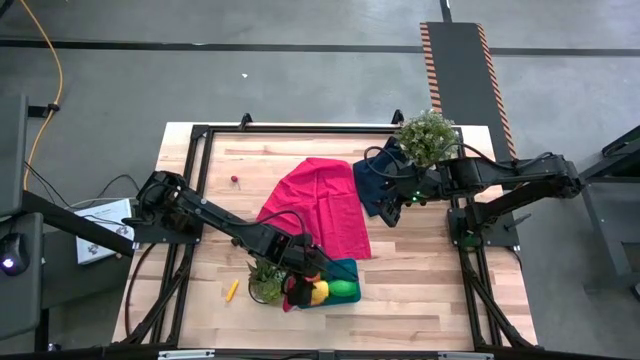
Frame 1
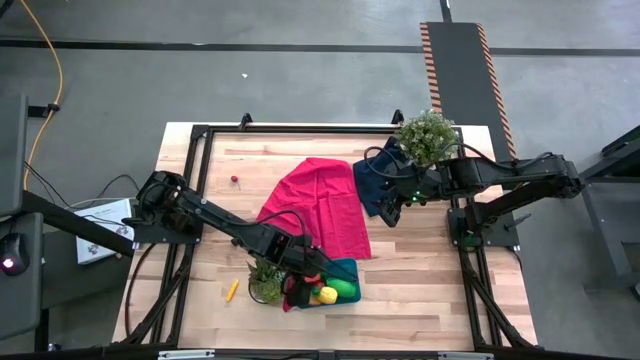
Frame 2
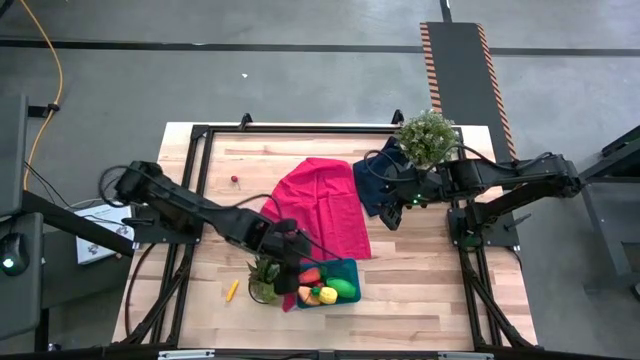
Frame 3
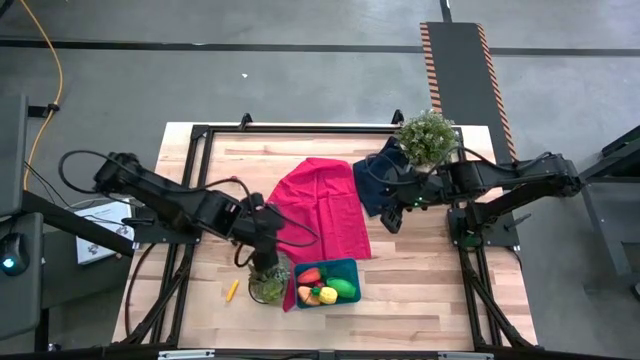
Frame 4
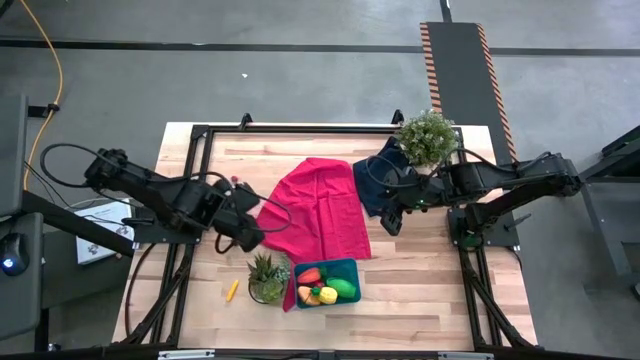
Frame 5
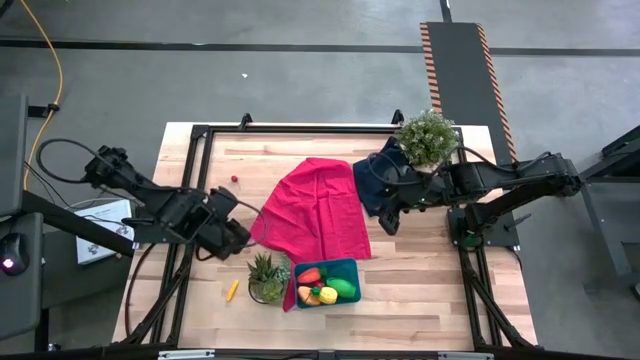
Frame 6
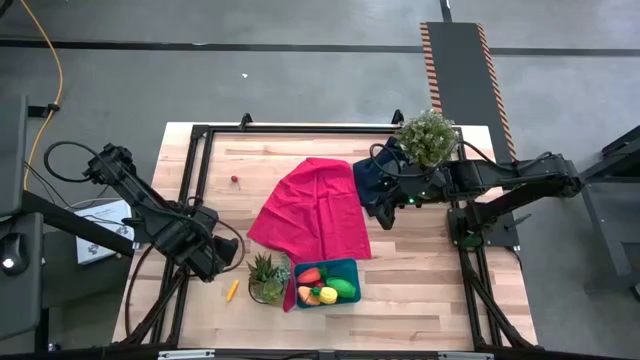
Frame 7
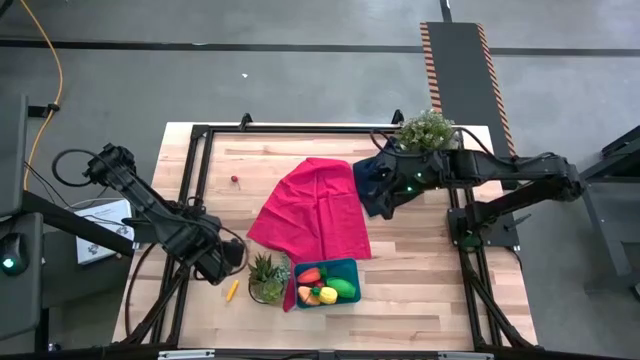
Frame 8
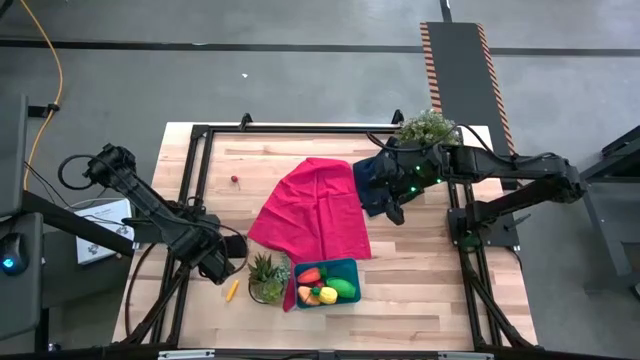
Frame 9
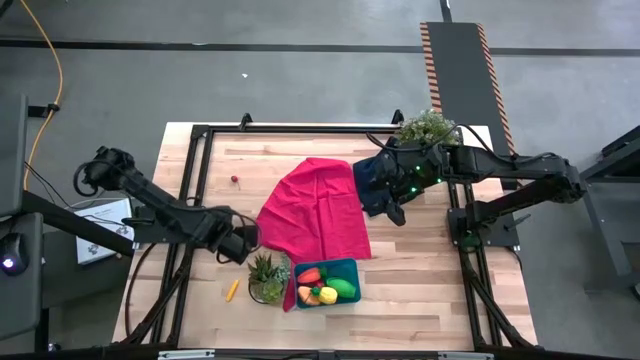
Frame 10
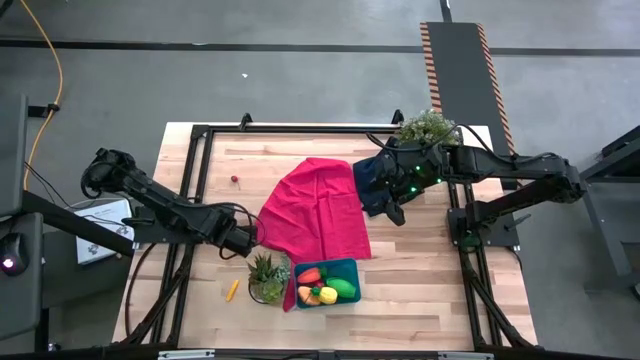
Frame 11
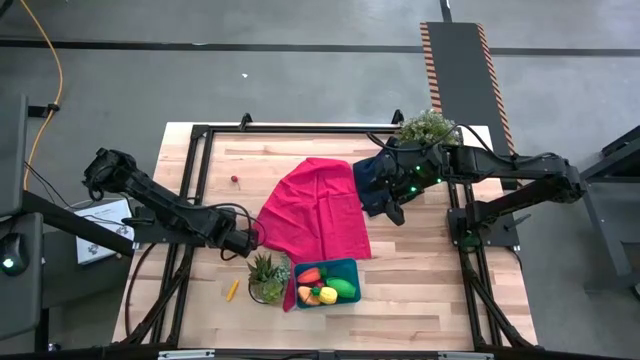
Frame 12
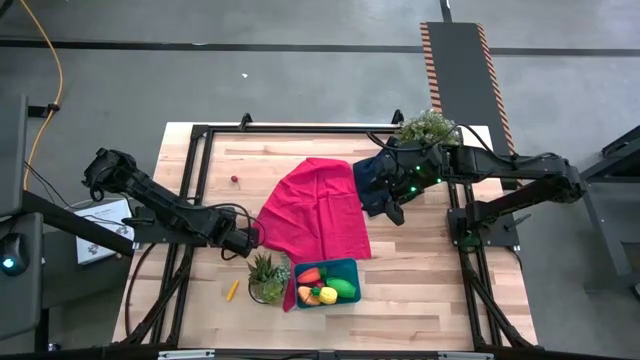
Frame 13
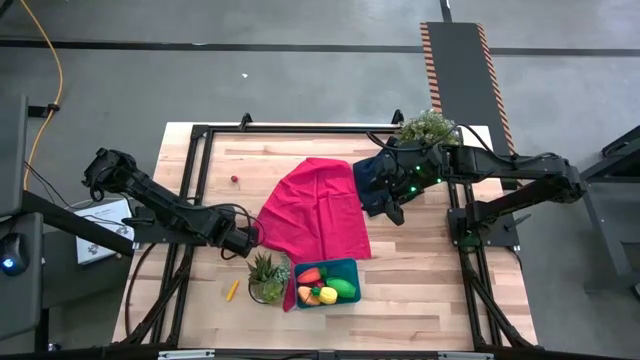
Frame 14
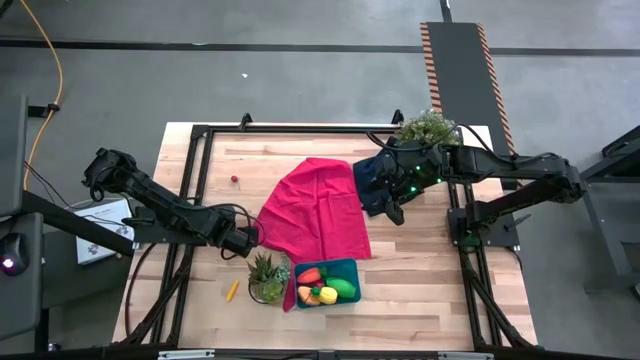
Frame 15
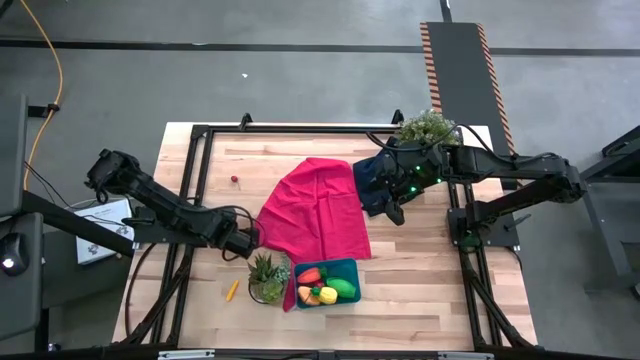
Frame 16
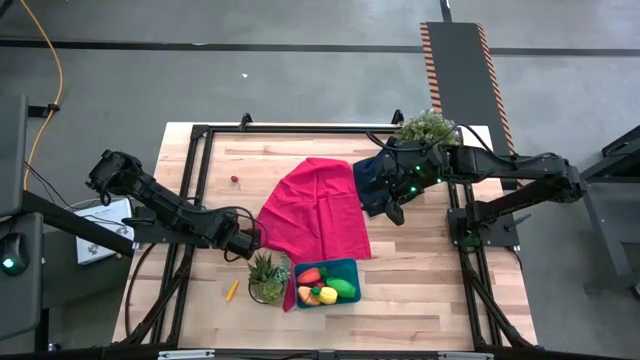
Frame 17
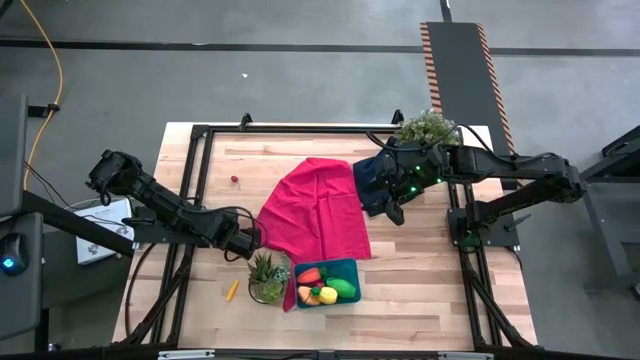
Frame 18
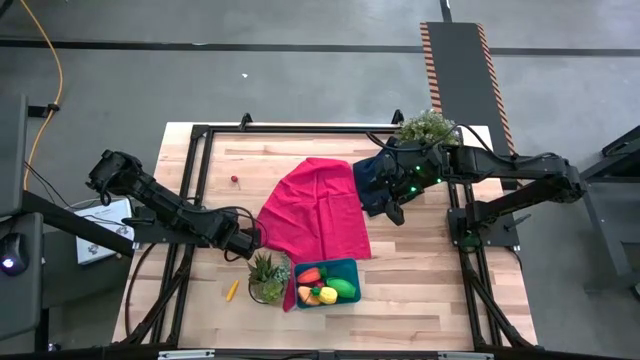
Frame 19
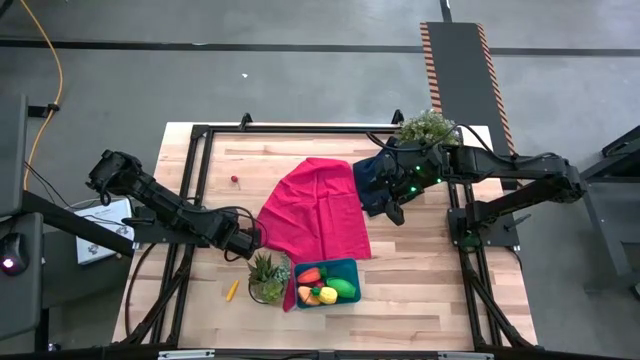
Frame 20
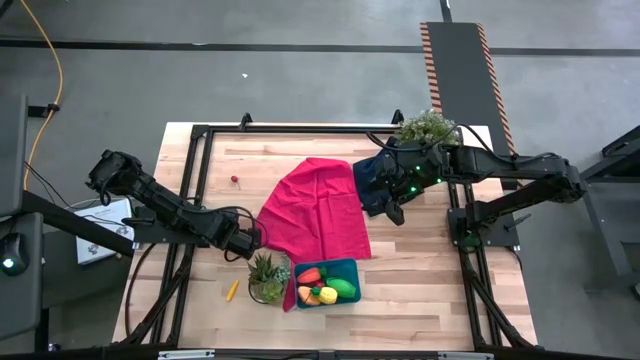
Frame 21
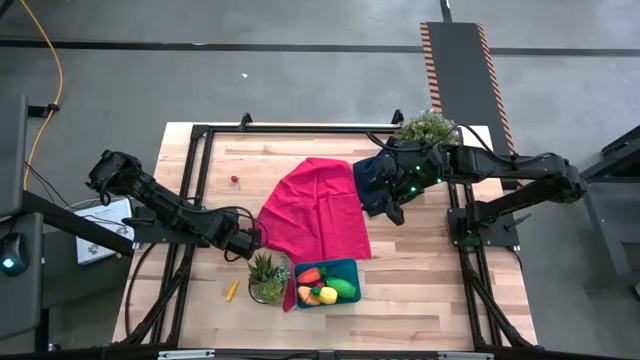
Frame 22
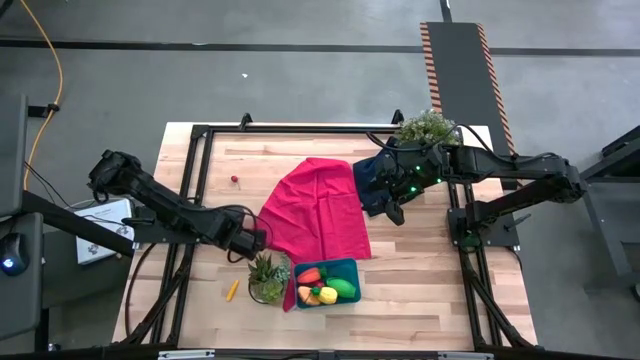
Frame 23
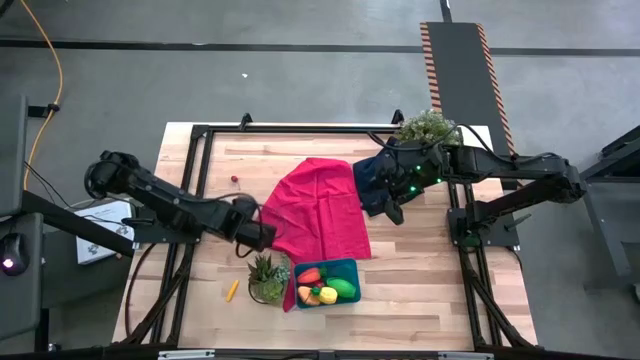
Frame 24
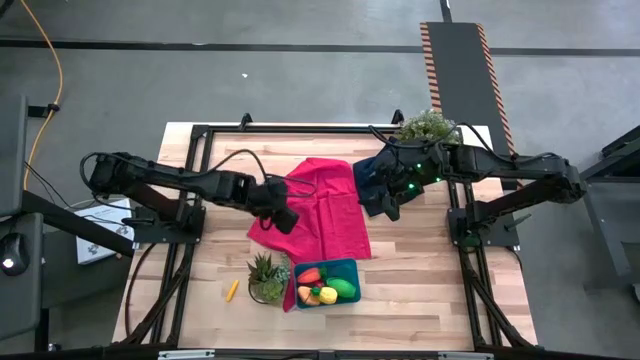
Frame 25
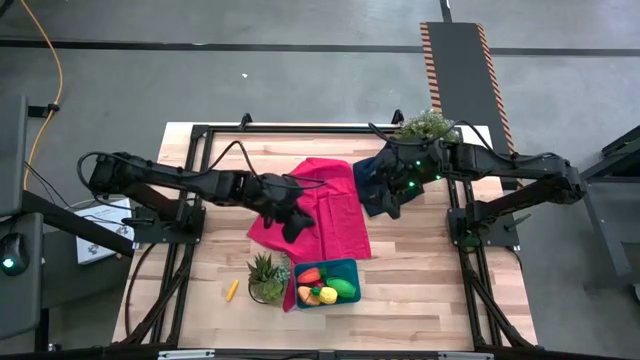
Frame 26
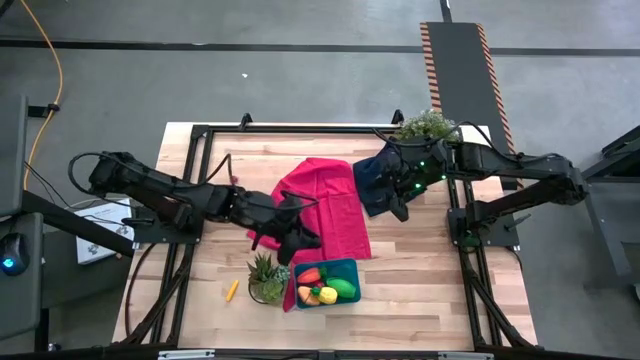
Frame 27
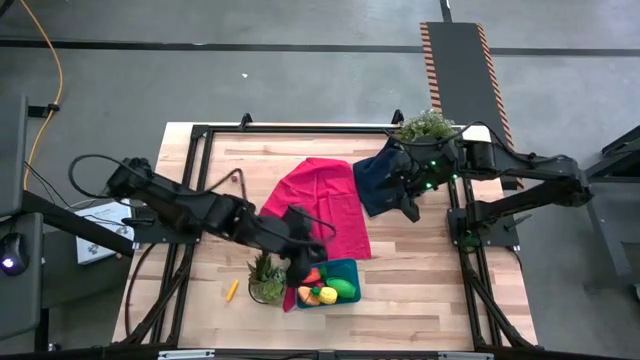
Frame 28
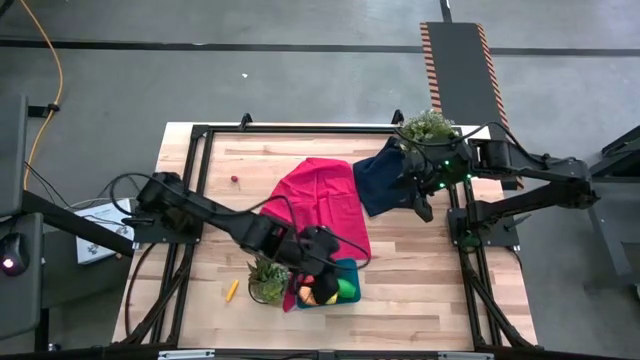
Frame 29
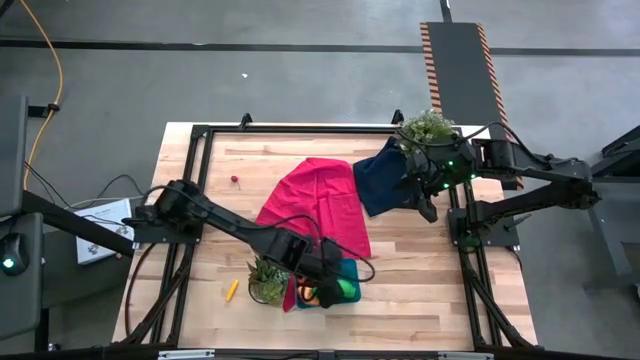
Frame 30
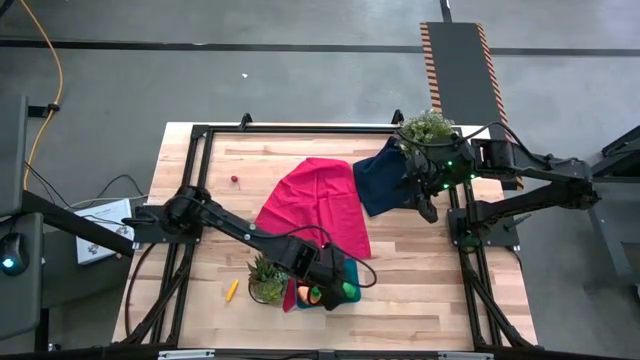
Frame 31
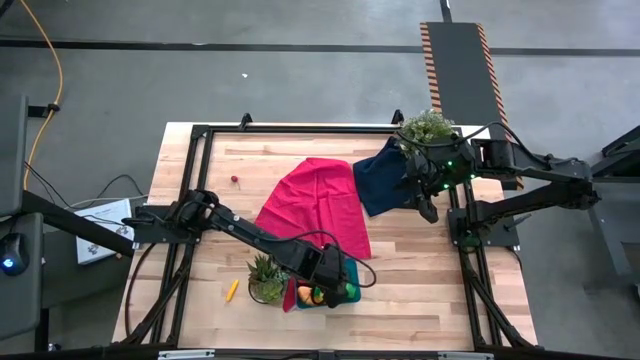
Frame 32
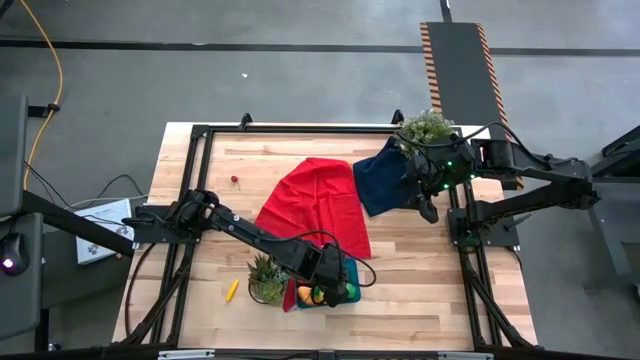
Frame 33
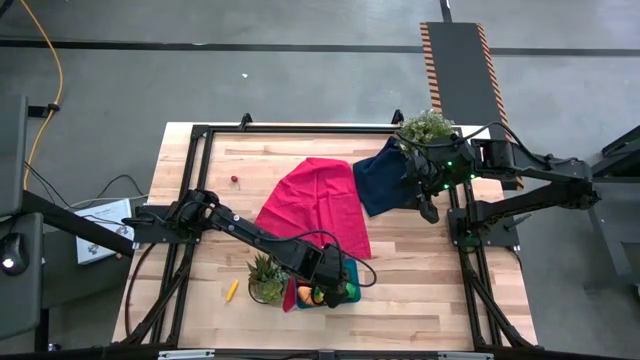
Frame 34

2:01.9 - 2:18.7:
Task: Pick and placing Produce into tupperware
Put the blackberry into the blue bin
